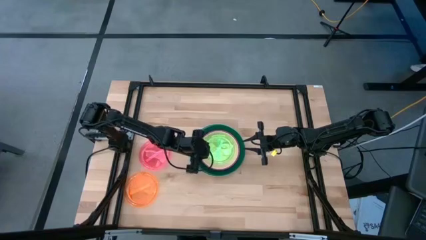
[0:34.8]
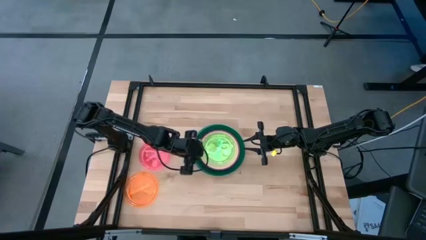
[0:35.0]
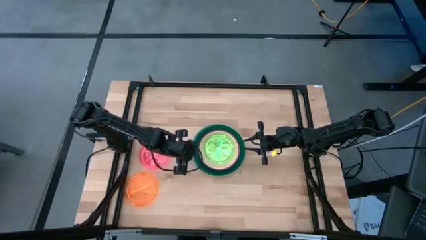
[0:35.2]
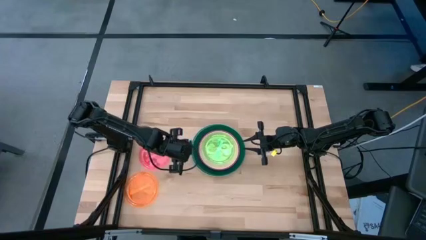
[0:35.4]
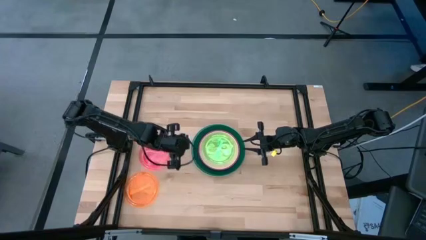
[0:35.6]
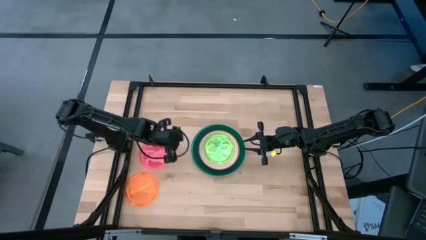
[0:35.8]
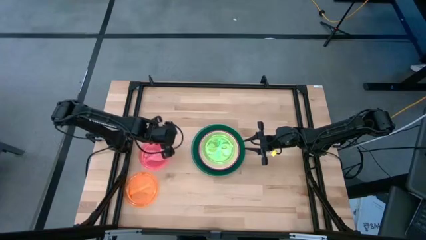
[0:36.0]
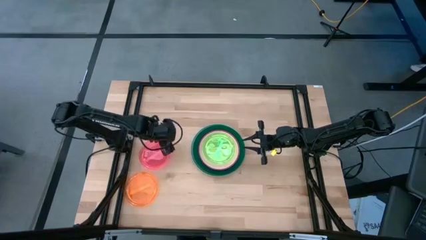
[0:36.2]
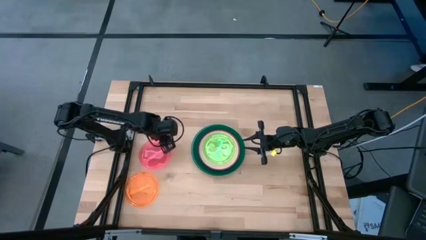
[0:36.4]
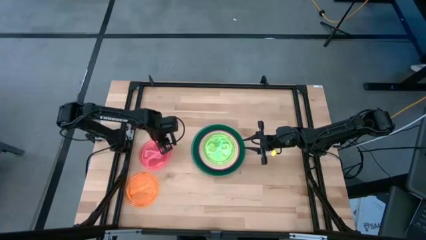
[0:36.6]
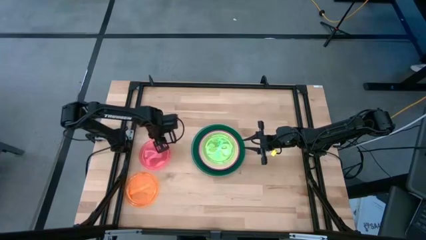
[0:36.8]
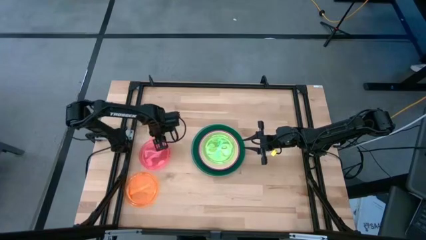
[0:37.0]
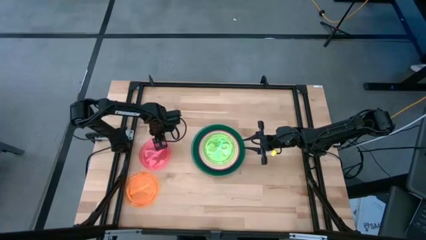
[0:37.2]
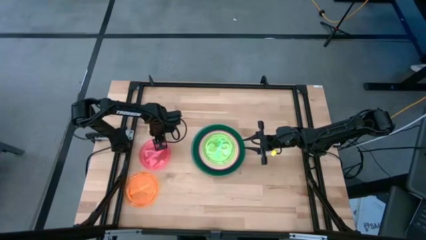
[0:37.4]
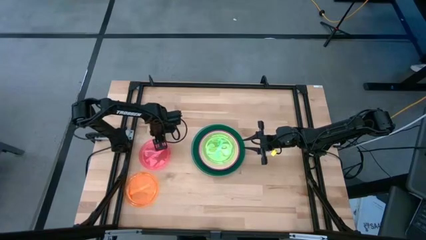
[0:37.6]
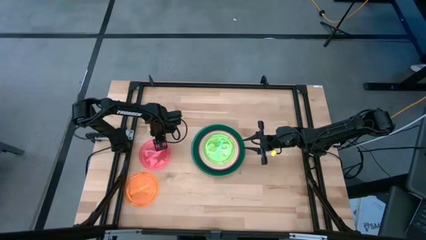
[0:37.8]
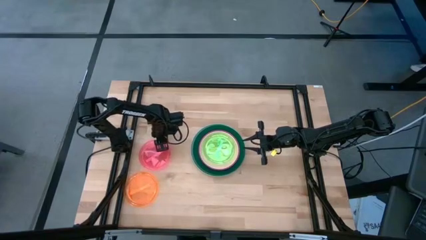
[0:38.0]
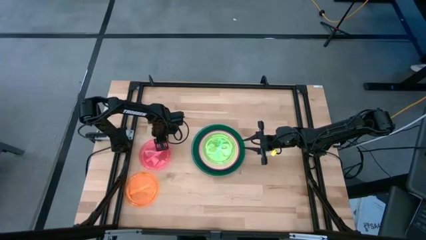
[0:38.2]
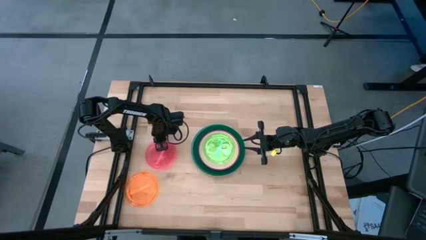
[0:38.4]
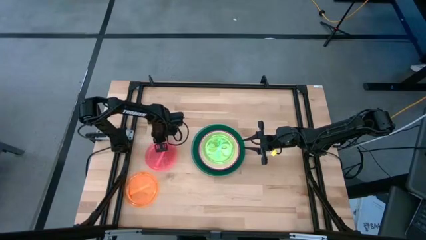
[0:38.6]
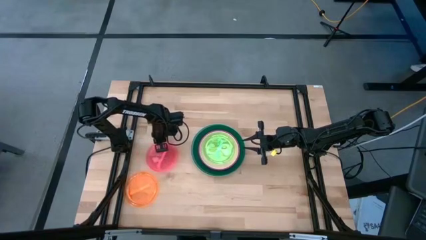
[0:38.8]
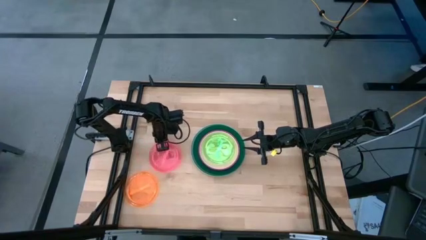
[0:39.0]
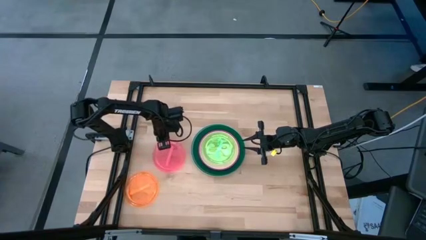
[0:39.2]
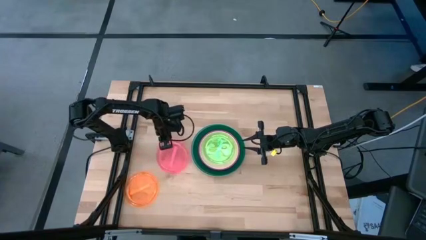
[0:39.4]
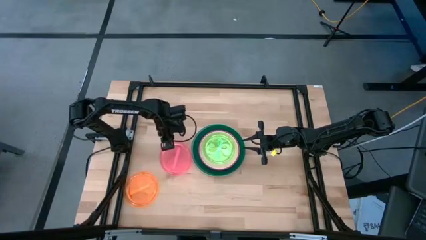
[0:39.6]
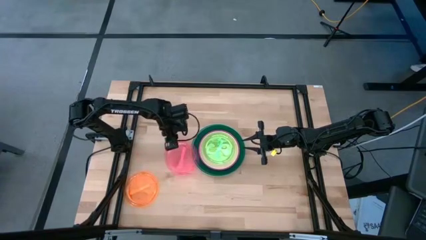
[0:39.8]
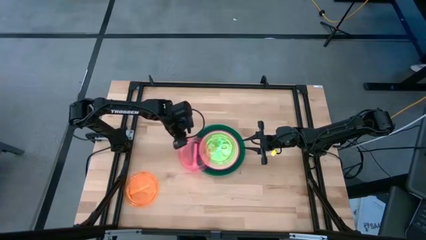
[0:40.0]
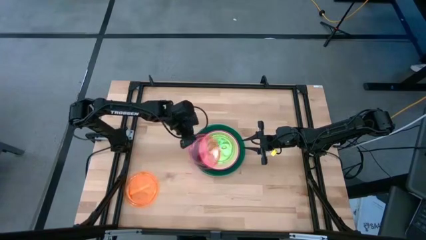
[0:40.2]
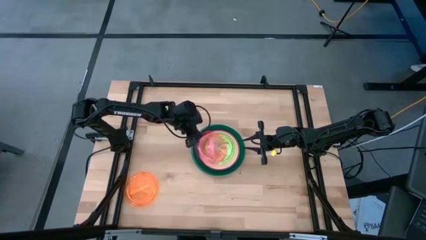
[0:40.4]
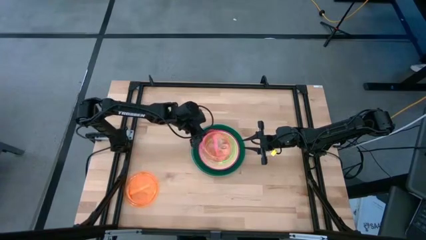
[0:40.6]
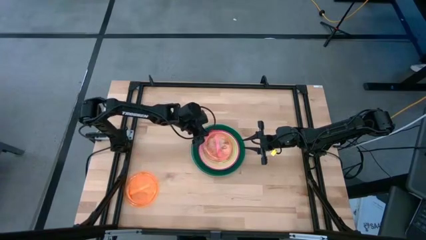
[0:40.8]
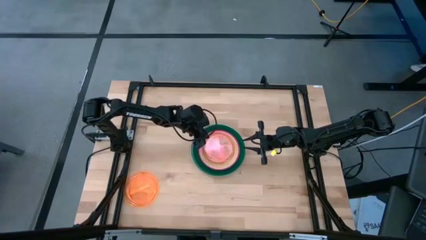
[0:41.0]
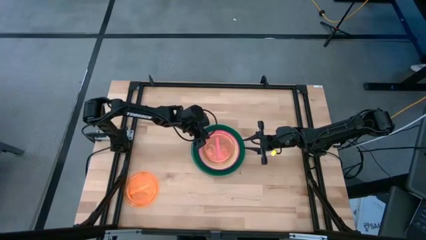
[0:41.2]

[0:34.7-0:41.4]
Task: Stack plastic plates
Stack the red plate on the green plate

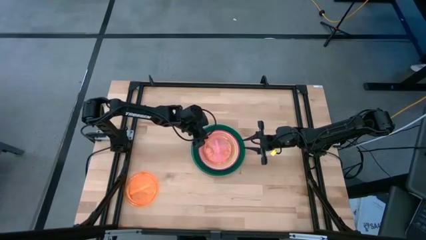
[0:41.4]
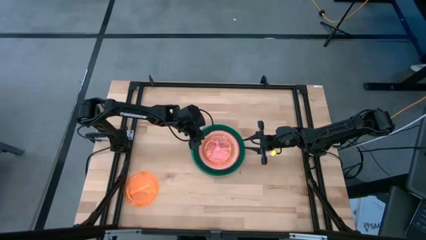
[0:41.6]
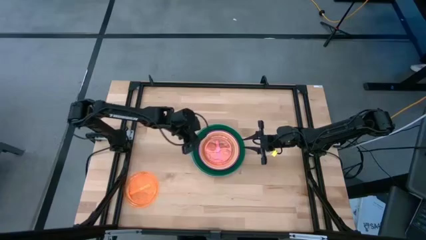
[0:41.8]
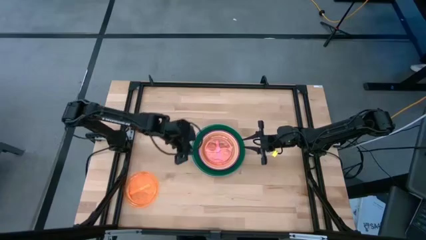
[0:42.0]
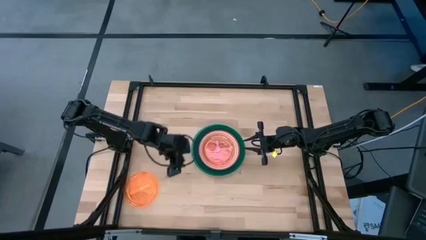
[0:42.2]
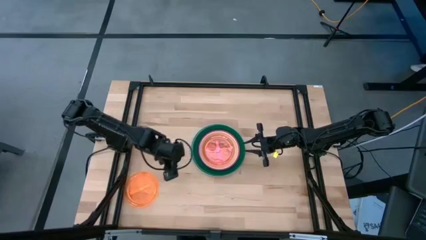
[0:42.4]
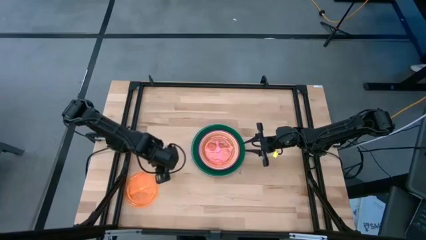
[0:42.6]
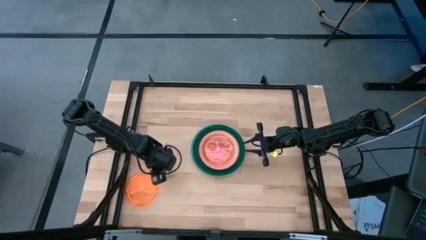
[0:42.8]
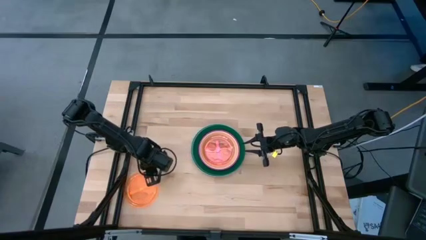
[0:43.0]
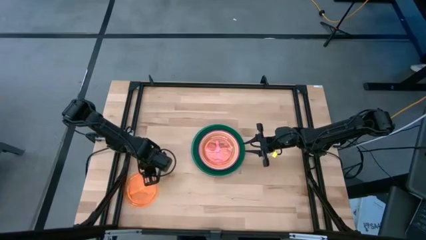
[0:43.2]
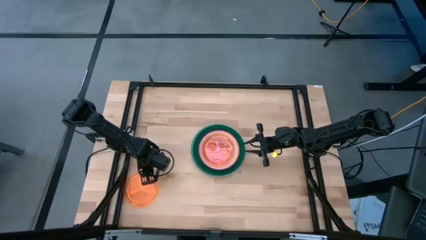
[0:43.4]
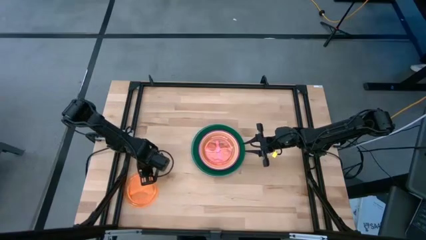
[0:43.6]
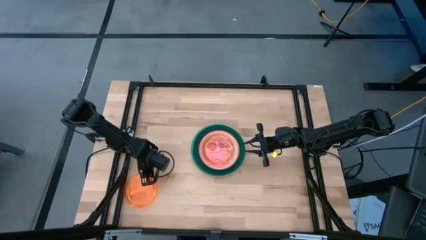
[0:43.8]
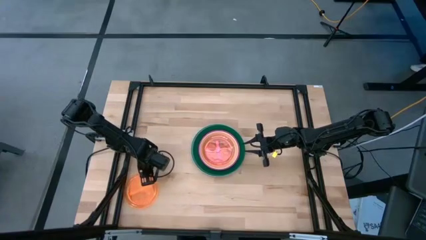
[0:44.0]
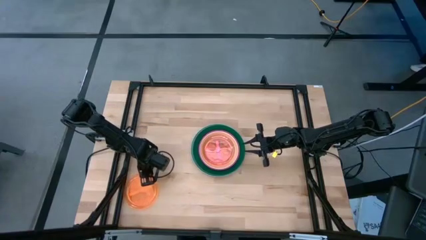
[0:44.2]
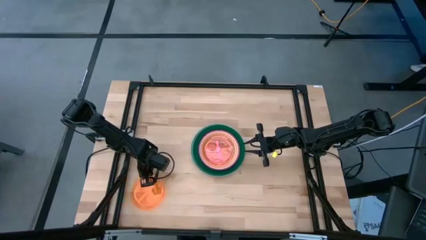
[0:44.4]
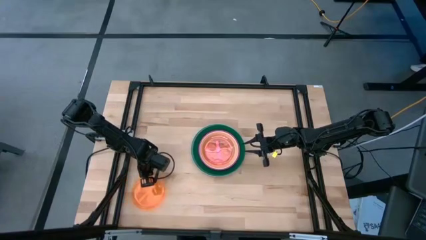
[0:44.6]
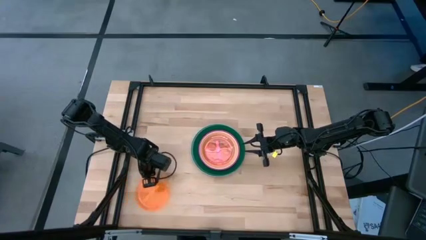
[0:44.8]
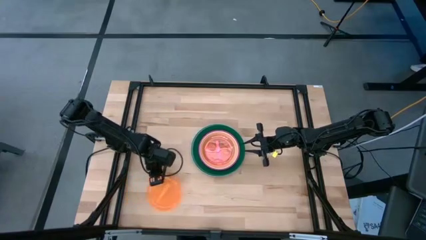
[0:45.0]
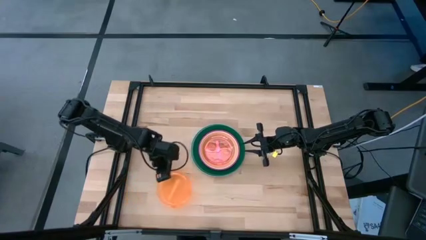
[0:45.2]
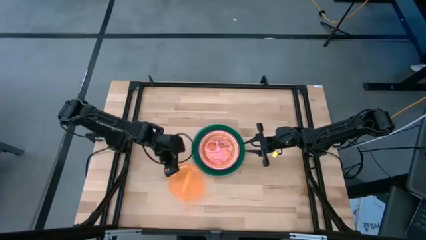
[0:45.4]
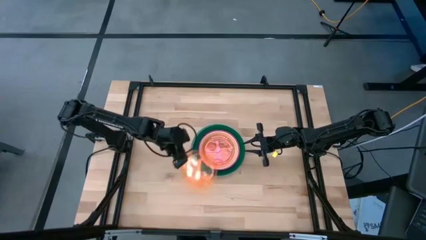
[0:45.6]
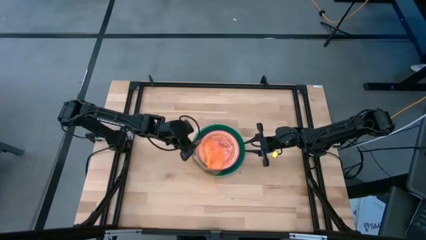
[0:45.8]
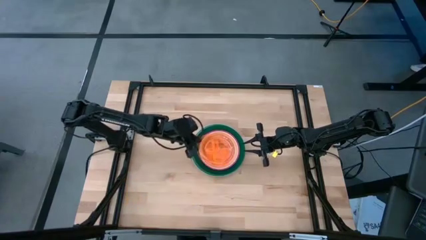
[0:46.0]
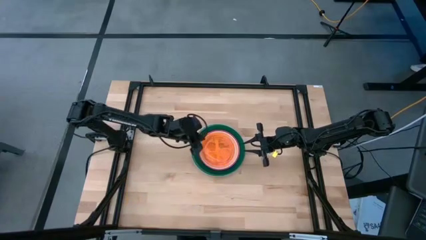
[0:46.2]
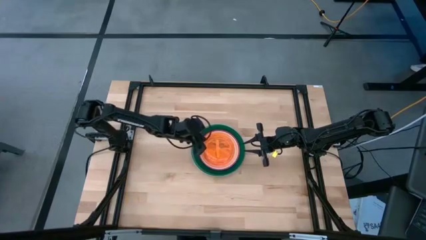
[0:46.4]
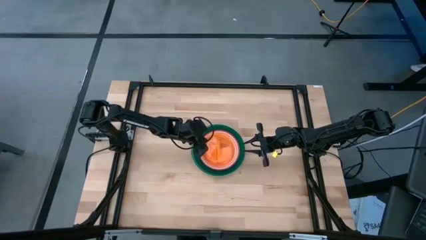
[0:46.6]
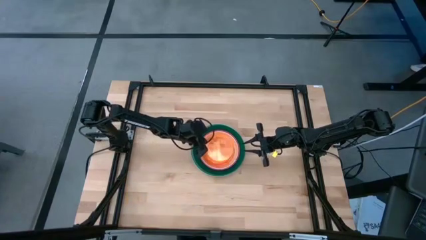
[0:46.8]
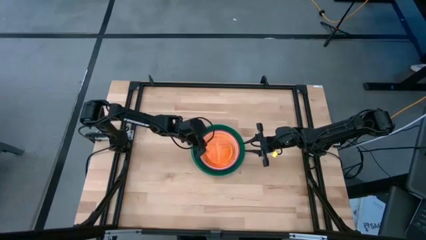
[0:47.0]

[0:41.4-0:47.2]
Stack the orange plate on the red plate

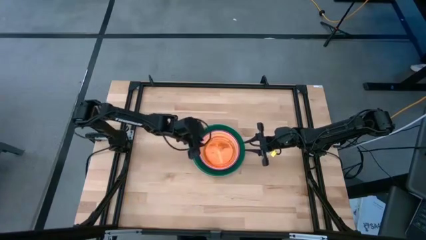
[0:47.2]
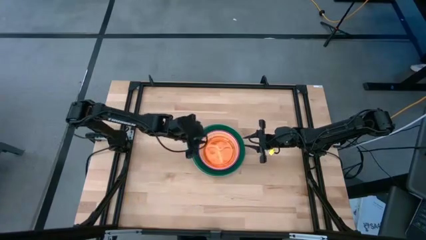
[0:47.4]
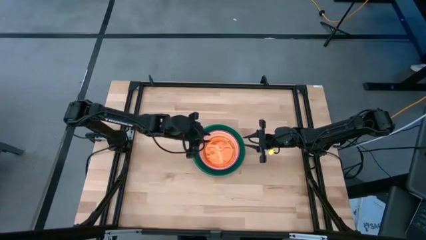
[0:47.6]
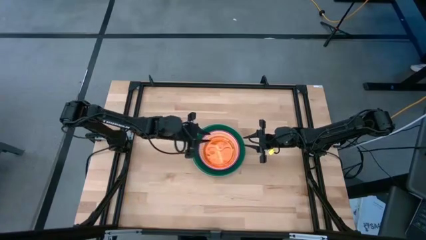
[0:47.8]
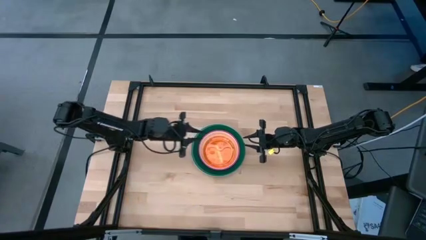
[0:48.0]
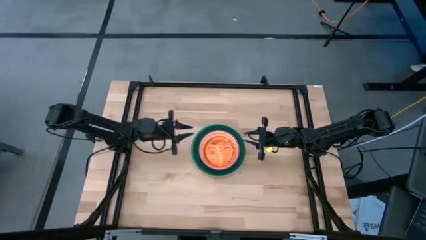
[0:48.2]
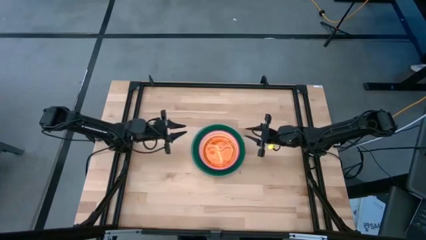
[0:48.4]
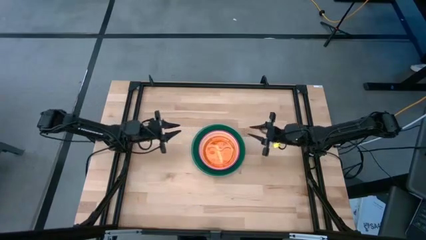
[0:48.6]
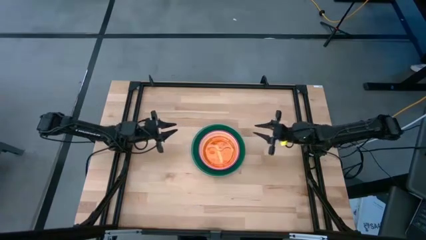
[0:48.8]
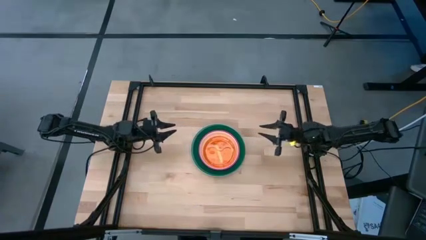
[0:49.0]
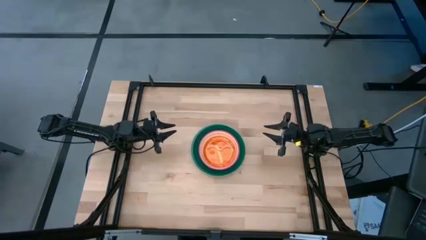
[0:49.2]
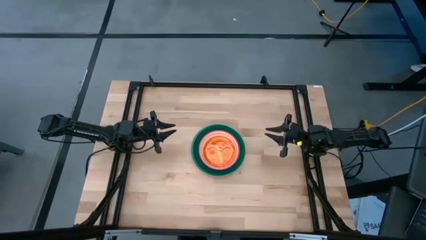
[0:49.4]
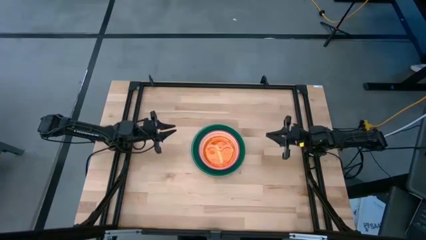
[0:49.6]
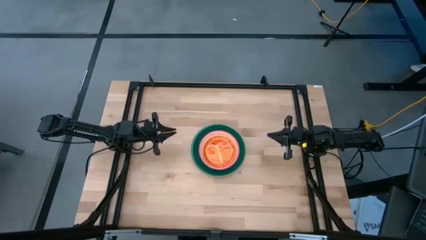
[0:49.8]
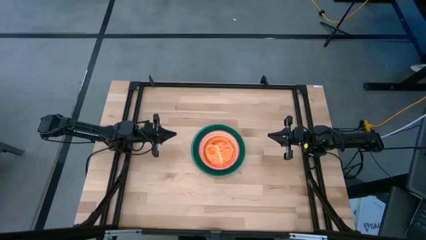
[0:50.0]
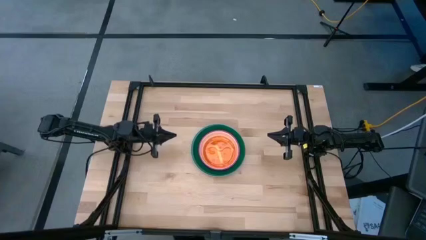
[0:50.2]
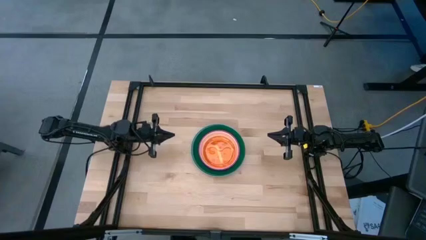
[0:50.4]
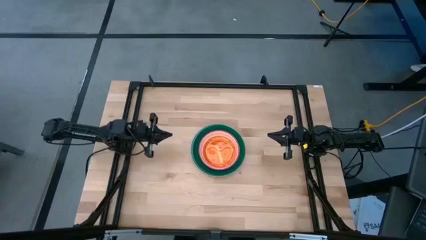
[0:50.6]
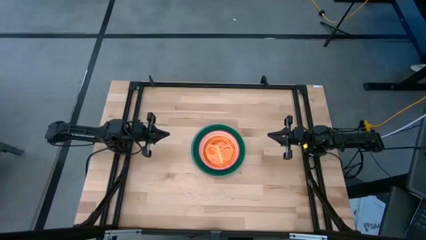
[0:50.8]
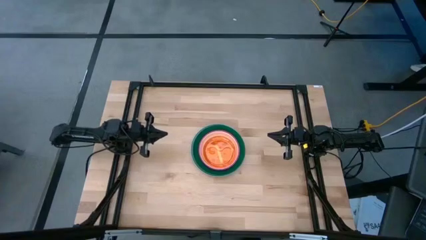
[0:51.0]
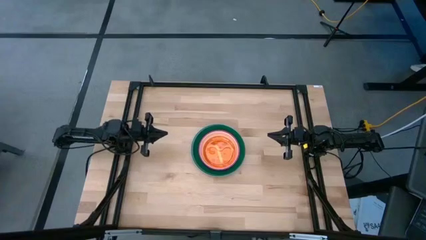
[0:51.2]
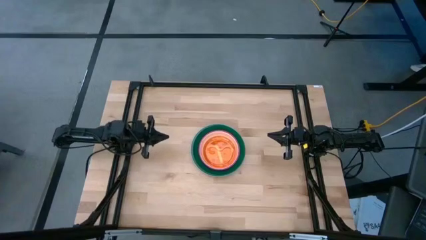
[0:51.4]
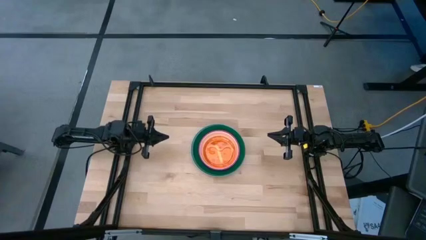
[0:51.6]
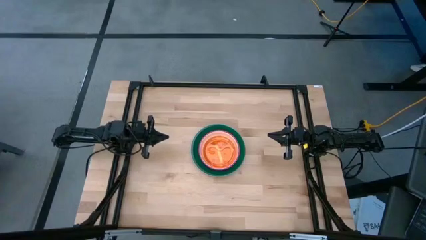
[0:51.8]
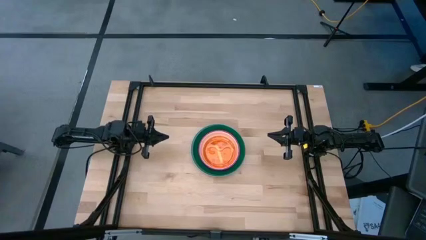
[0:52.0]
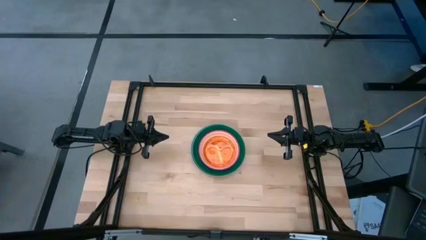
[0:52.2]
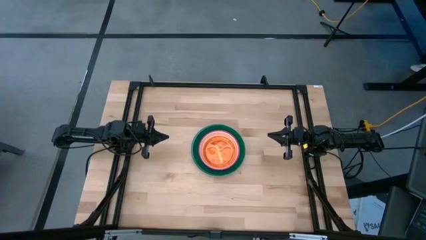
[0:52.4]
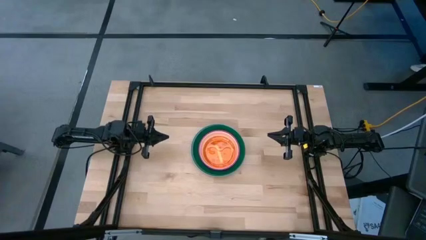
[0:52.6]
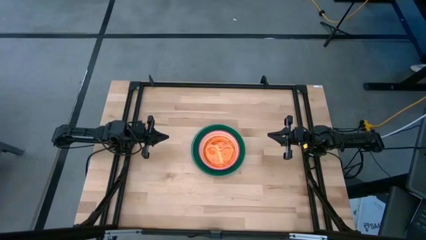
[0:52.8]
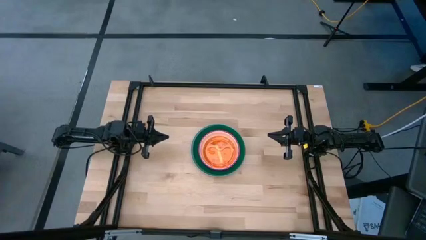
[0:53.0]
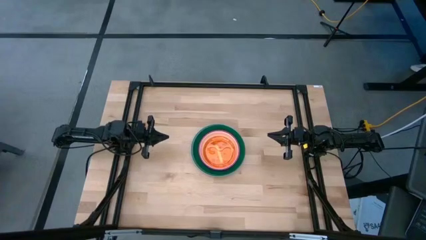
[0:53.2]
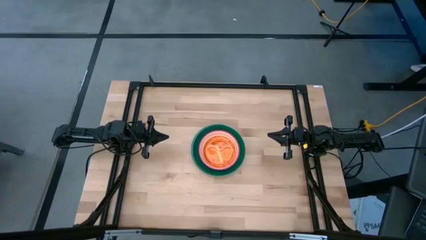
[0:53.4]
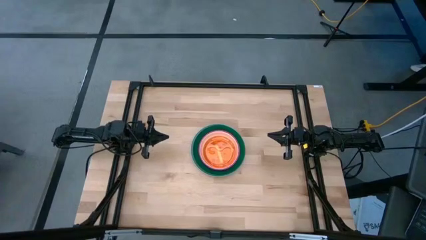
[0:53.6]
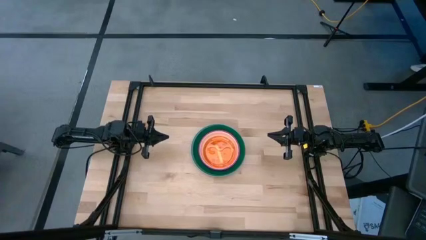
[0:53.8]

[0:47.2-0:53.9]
Return to Home Position
